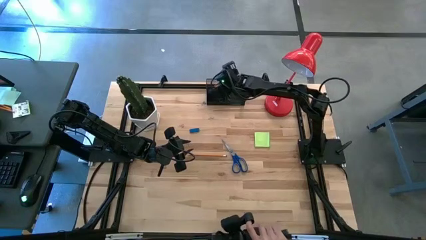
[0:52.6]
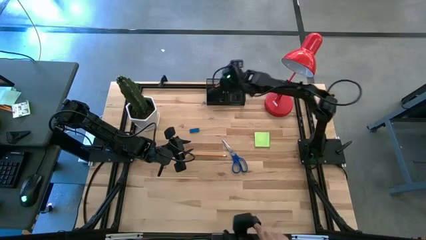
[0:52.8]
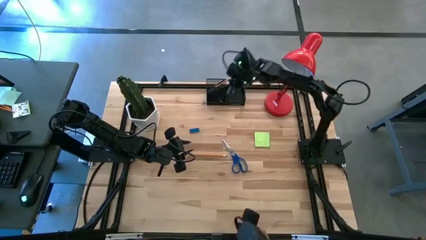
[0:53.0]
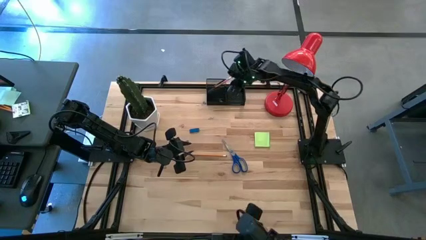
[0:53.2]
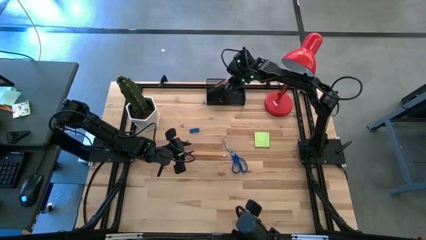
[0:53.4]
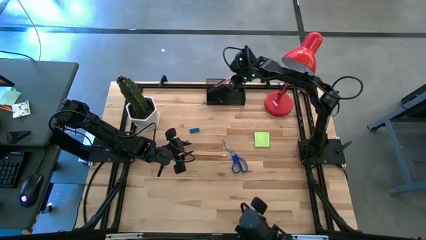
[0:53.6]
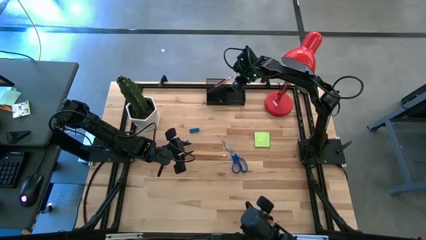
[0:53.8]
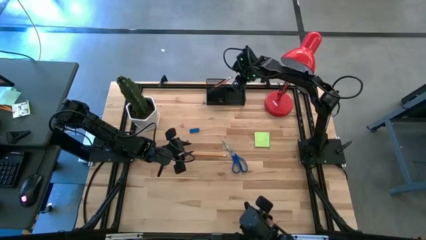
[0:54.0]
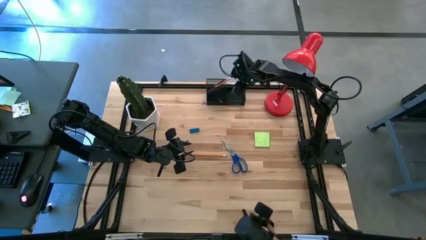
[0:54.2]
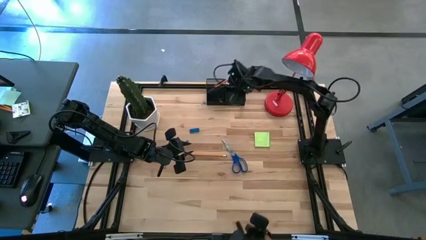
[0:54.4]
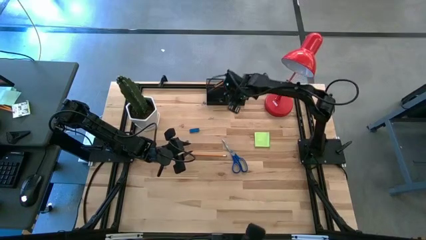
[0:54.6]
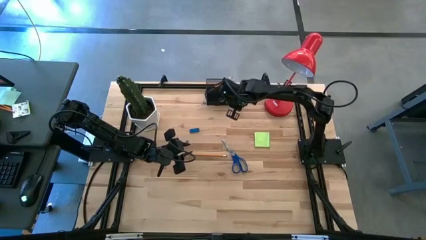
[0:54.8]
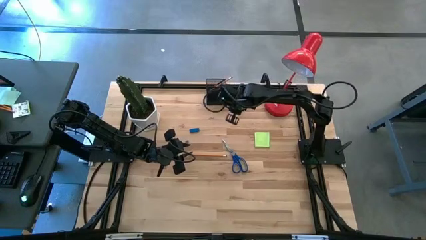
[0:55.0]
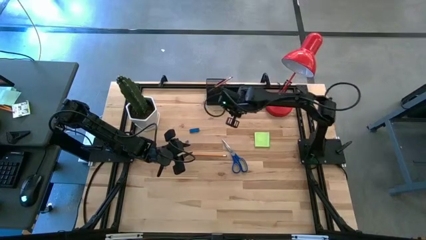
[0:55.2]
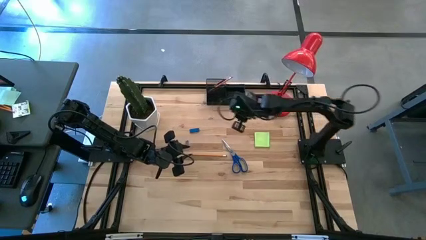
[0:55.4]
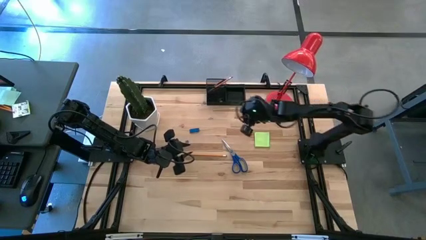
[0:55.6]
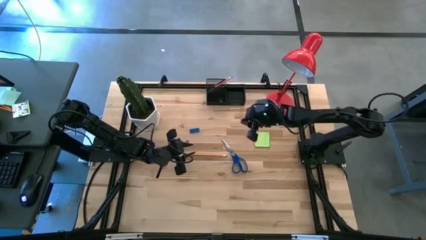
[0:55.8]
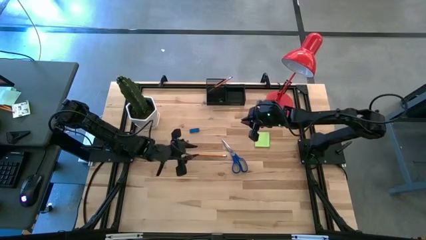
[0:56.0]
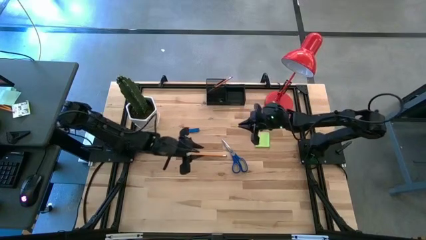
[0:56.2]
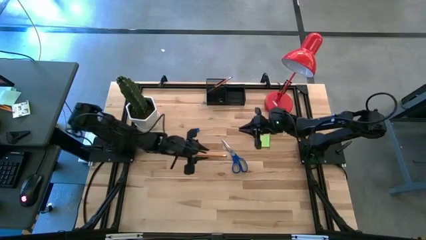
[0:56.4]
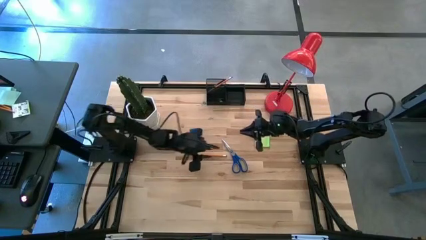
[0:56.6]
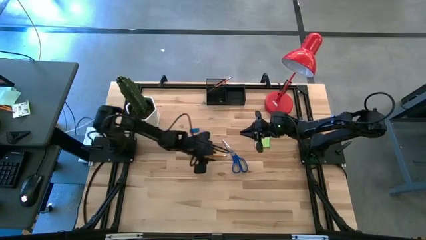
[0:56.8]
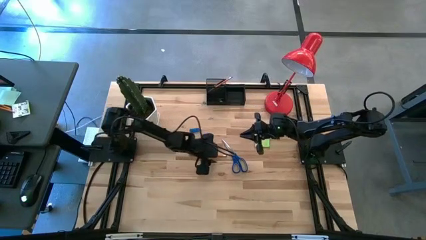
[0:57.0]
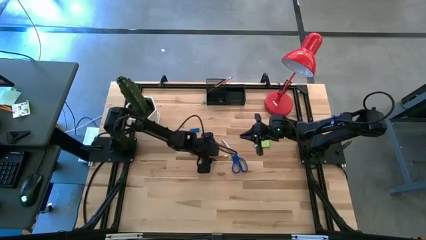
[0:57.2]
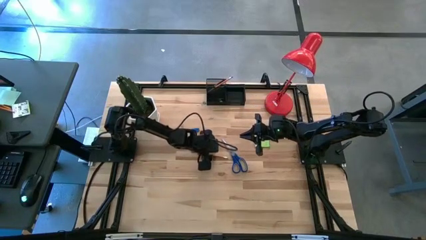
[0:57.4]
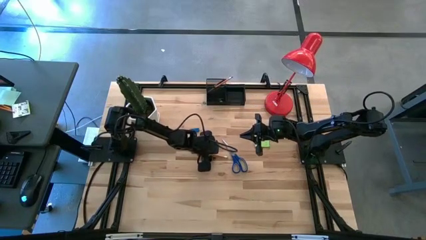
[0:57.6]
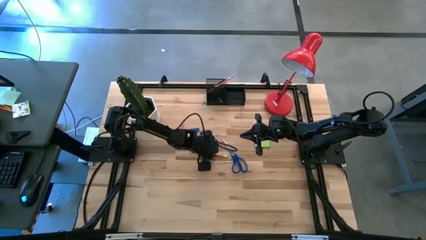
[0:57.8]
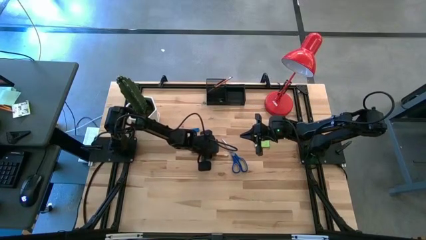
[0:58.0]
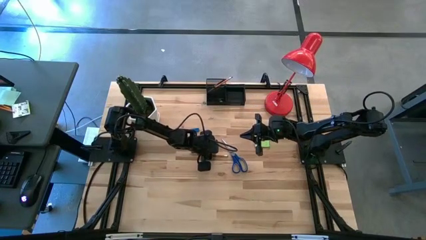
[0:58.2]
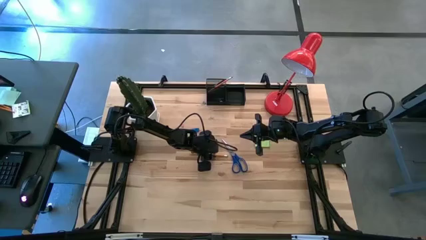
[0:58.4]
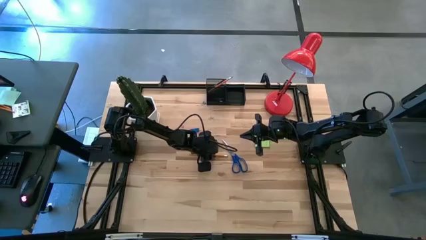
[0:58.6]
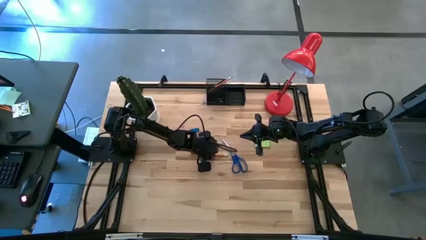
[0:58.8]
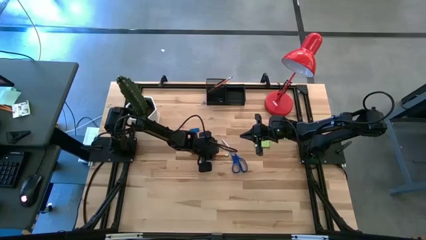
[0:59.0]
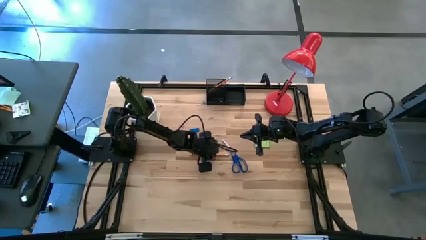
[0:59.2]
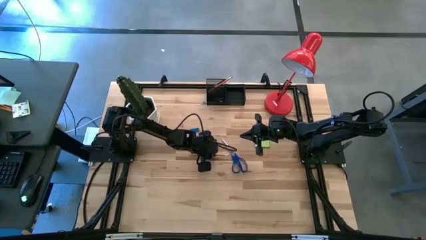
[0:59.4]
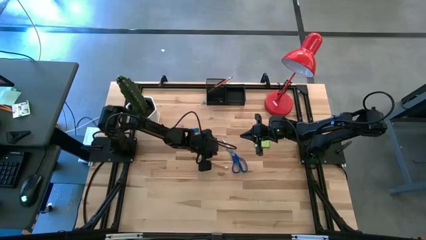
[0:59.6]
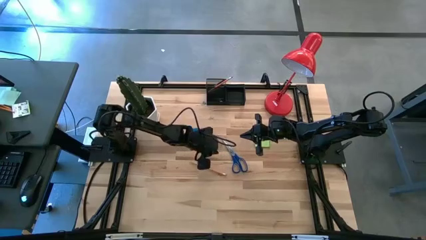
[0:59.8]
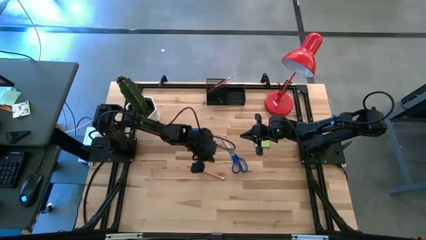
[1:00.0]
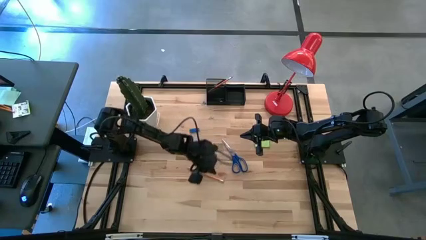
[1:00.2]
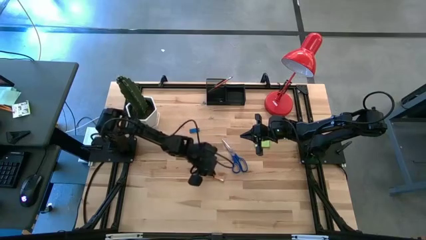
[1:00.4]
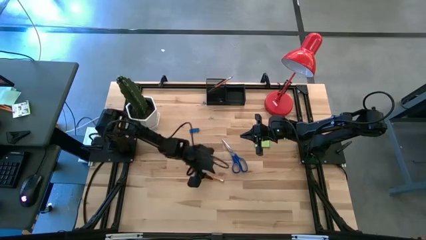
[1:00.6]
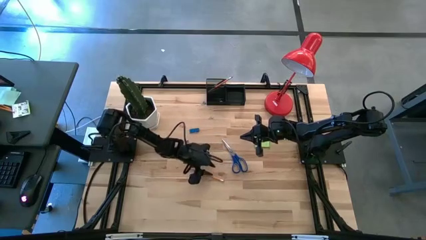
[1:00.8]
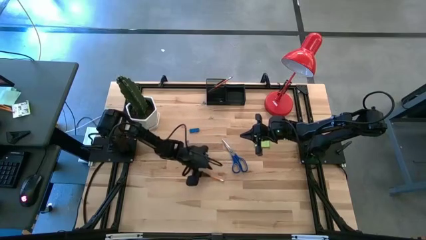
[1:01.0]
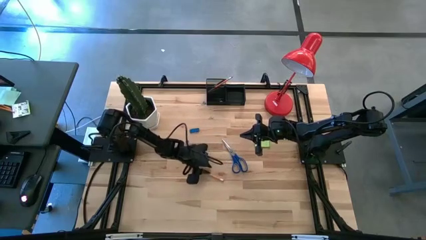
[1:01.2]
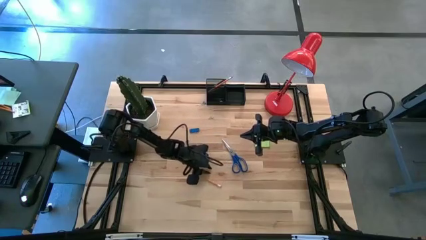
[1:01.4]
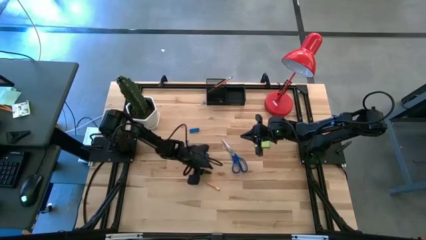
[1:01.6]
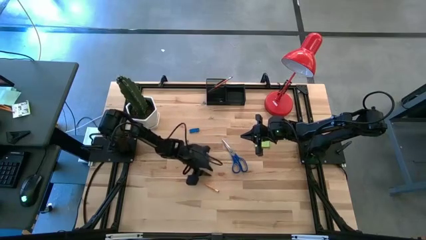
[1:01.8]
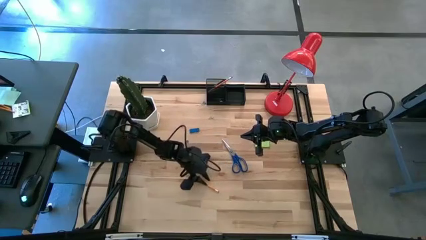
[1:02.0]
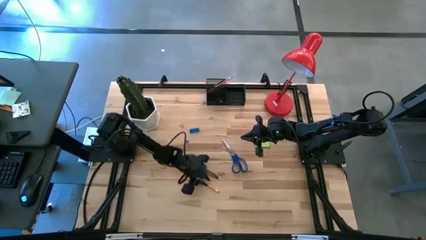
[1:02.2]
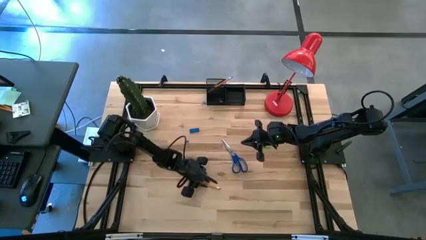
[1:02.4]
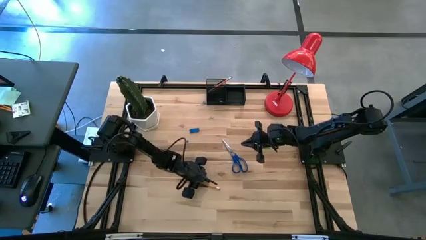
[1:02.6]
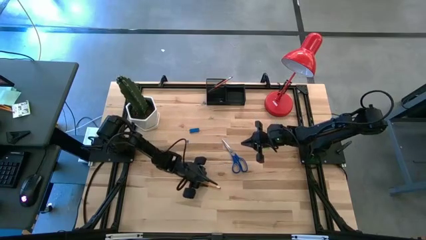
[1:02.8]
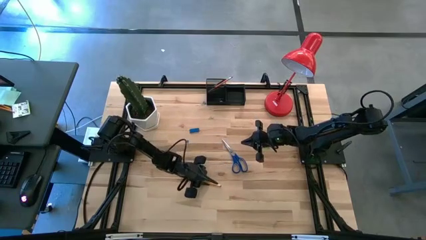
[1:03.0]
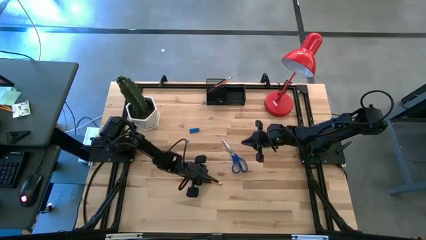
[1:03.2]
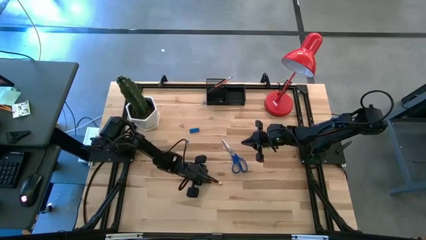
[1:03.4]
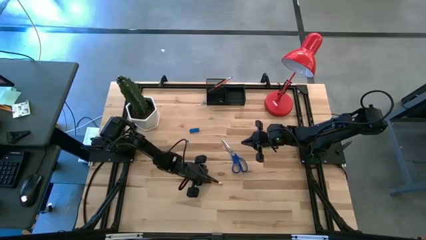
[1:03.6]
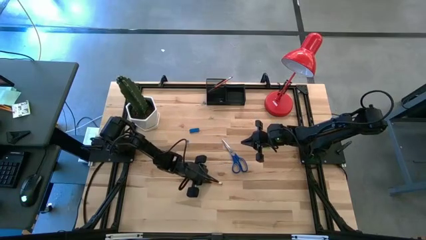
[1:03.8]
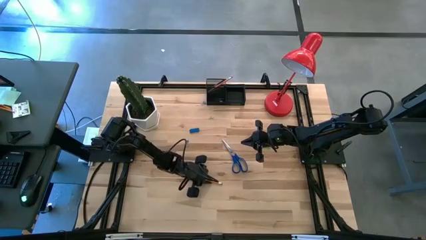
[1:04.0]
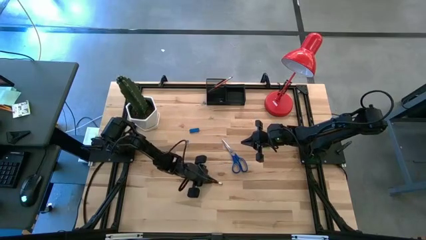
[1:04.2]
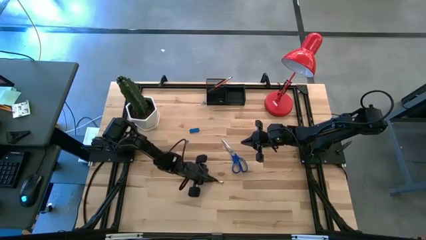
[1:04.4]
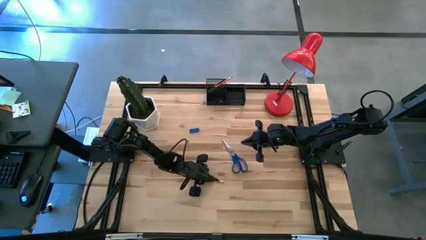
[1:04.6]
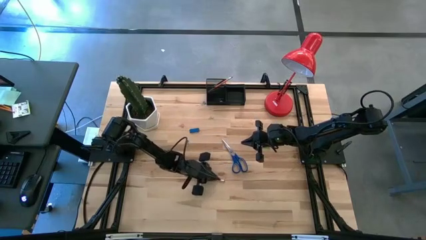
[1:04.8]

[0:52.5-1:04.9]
Task: Pick and place office supplies into organizer
Put the yellow pencil into the top left section of the desk organizer
